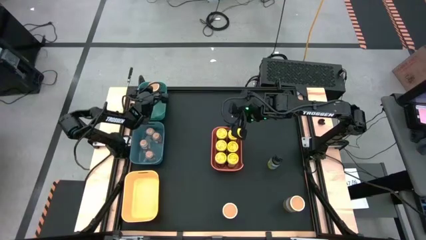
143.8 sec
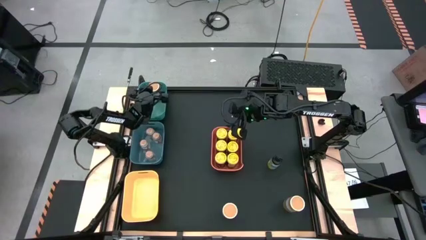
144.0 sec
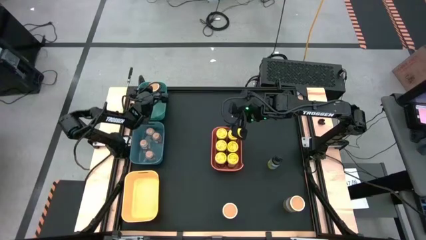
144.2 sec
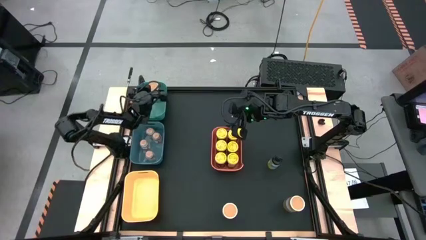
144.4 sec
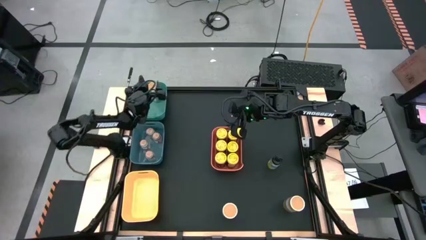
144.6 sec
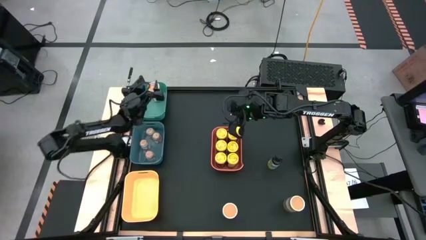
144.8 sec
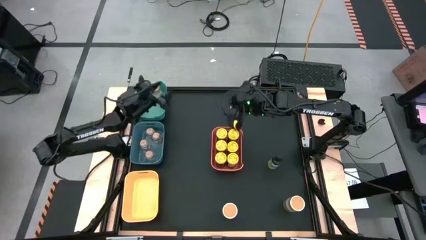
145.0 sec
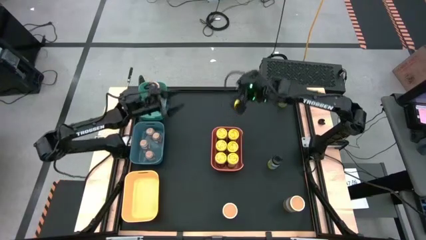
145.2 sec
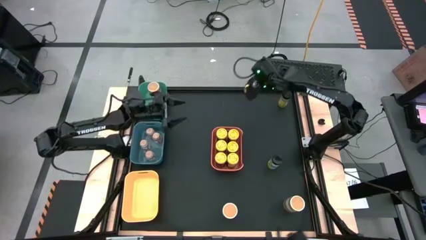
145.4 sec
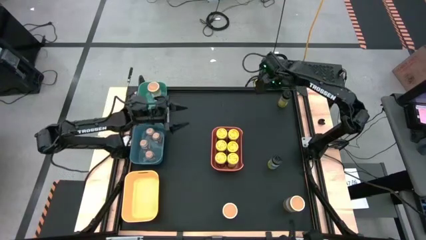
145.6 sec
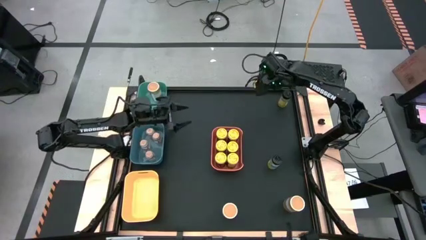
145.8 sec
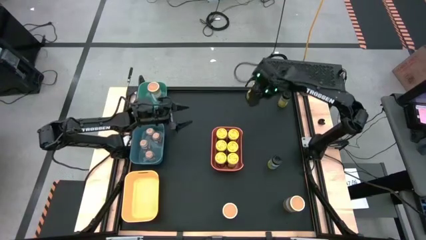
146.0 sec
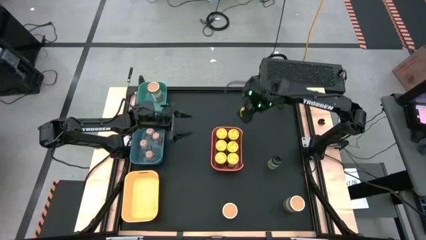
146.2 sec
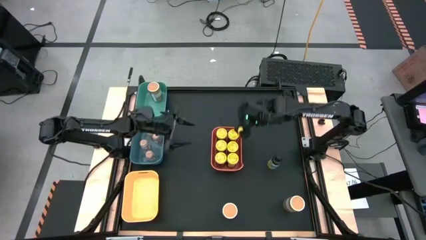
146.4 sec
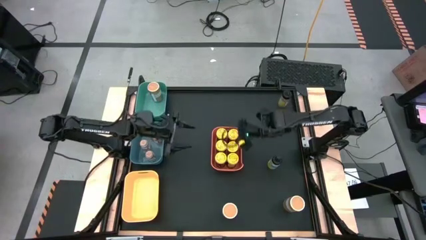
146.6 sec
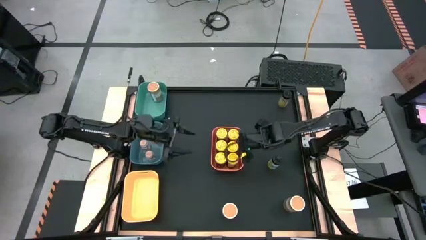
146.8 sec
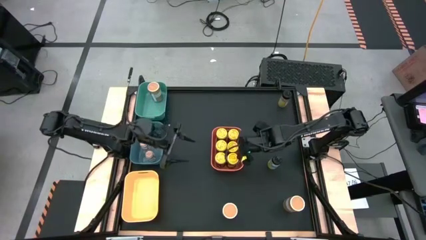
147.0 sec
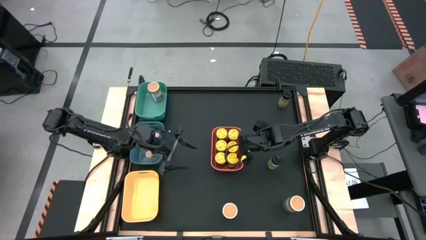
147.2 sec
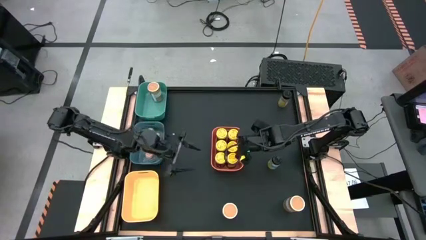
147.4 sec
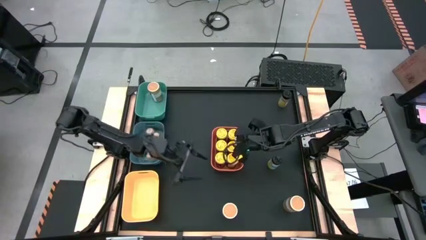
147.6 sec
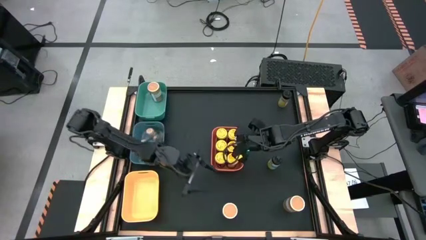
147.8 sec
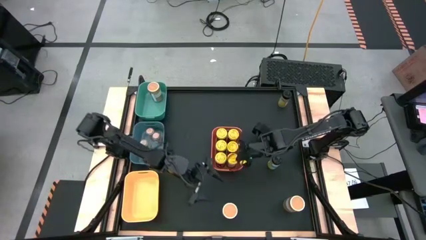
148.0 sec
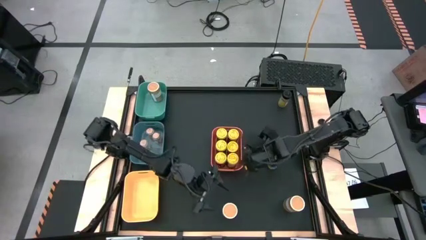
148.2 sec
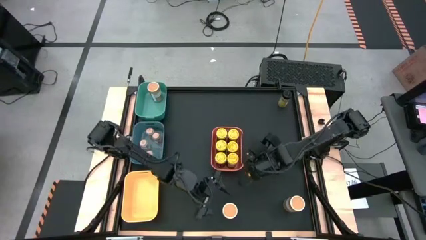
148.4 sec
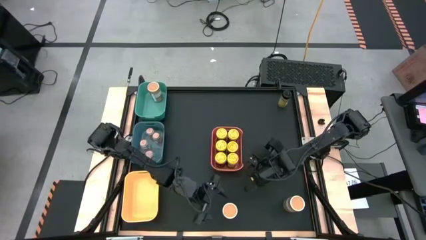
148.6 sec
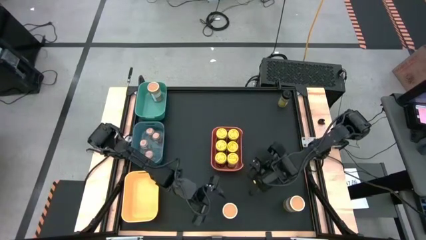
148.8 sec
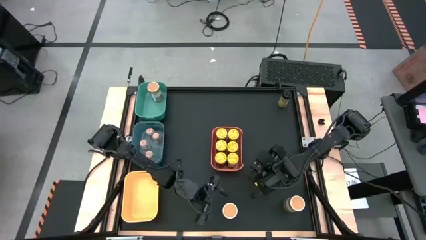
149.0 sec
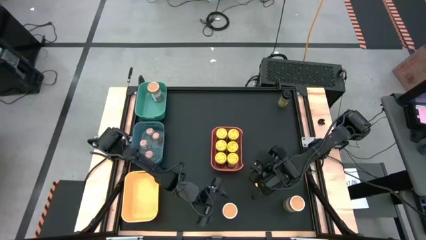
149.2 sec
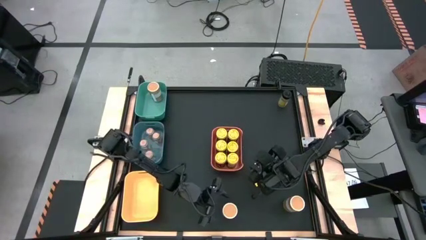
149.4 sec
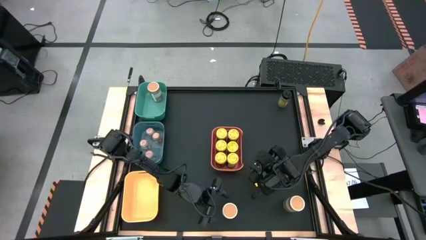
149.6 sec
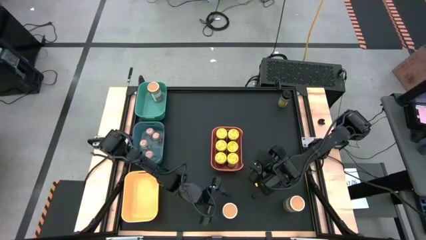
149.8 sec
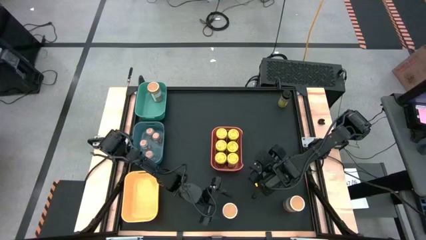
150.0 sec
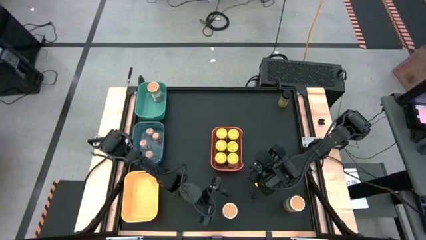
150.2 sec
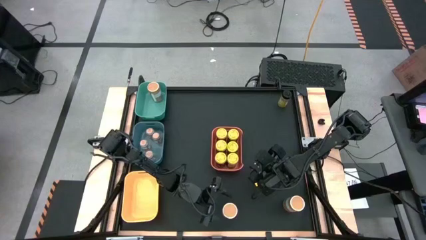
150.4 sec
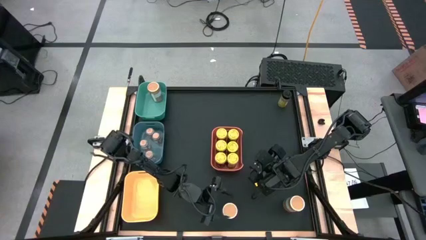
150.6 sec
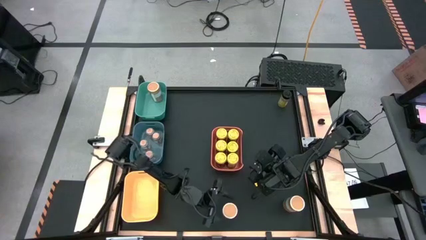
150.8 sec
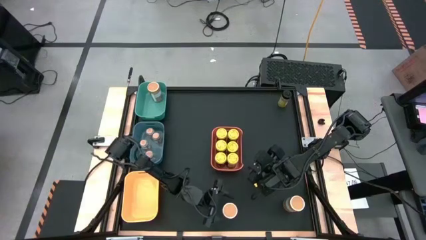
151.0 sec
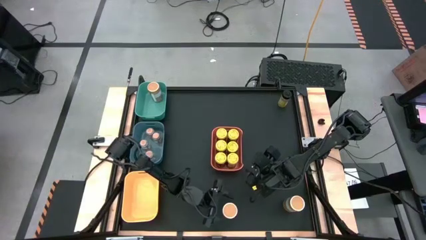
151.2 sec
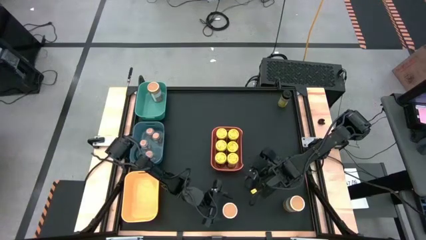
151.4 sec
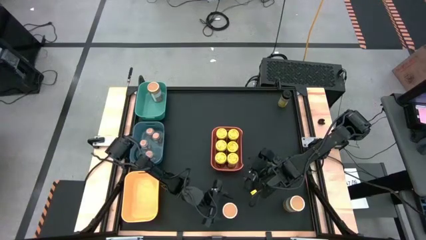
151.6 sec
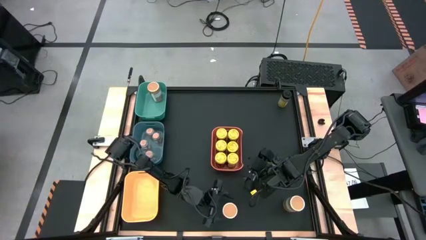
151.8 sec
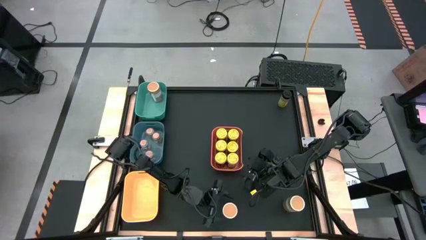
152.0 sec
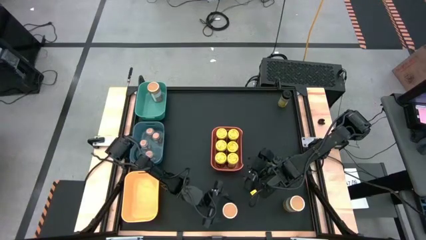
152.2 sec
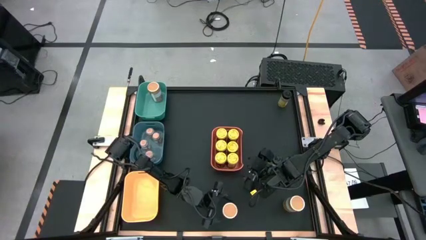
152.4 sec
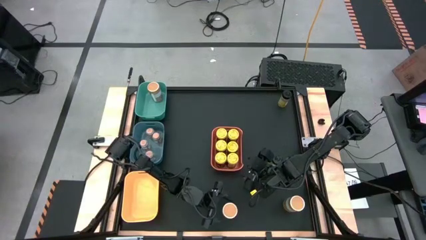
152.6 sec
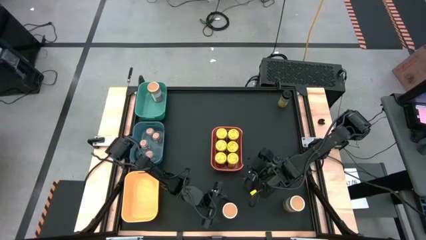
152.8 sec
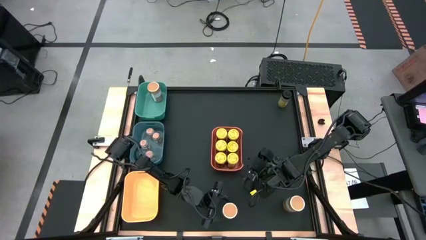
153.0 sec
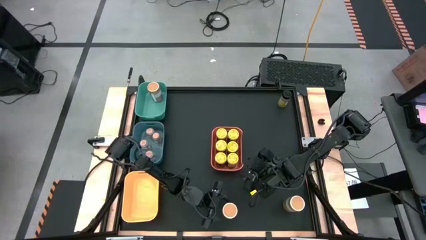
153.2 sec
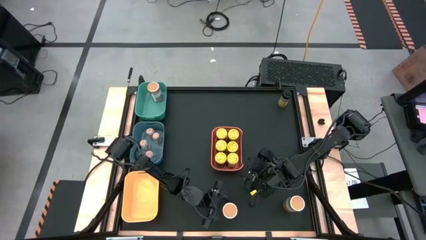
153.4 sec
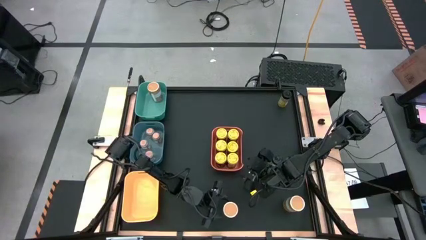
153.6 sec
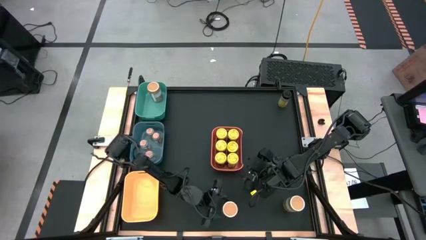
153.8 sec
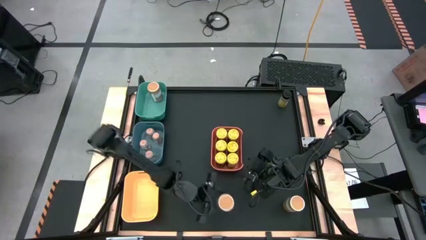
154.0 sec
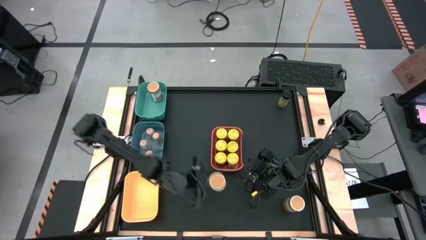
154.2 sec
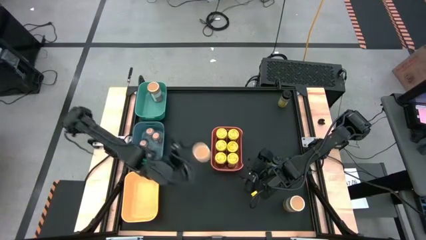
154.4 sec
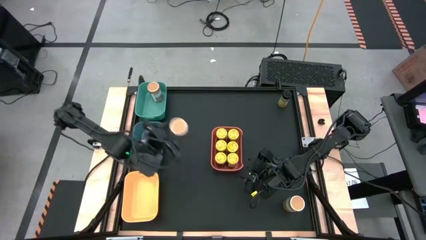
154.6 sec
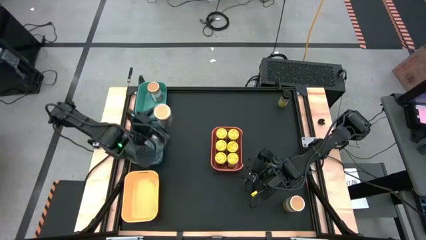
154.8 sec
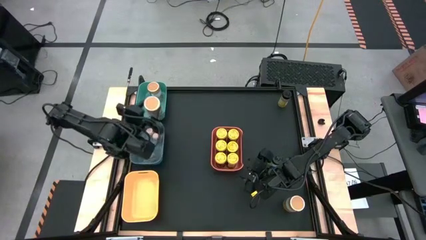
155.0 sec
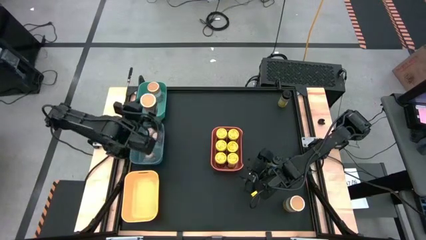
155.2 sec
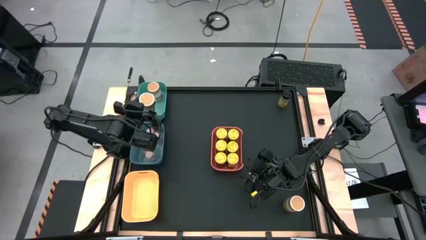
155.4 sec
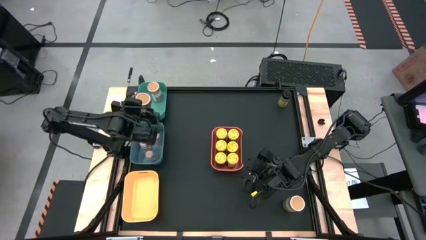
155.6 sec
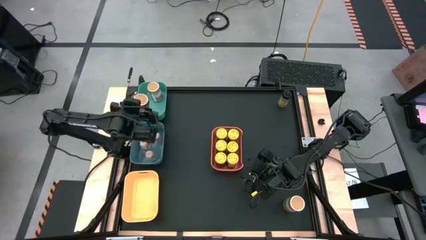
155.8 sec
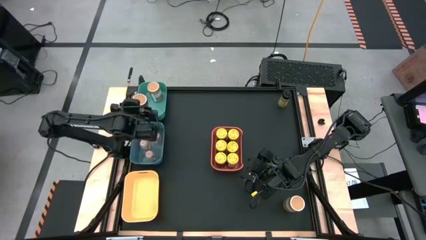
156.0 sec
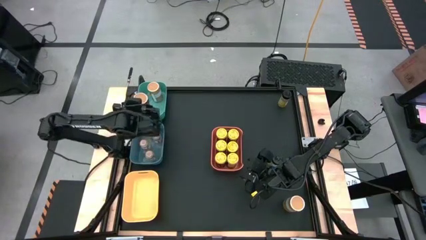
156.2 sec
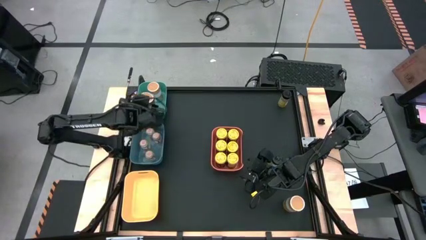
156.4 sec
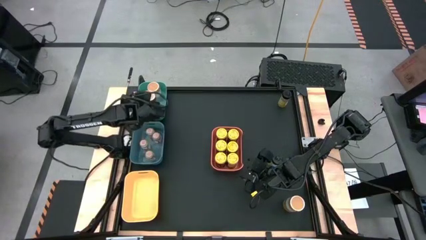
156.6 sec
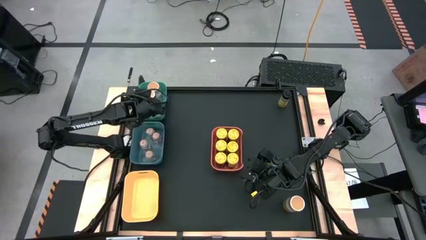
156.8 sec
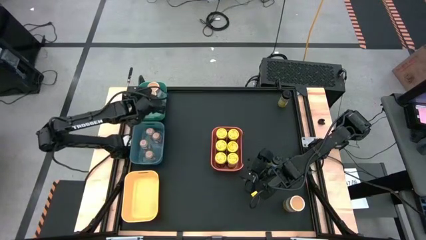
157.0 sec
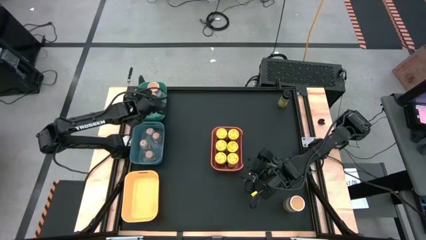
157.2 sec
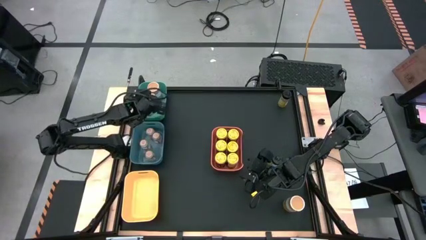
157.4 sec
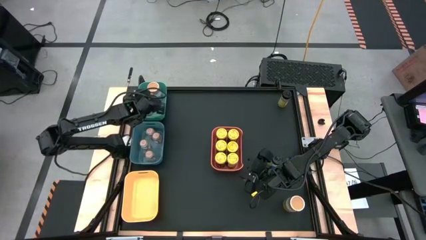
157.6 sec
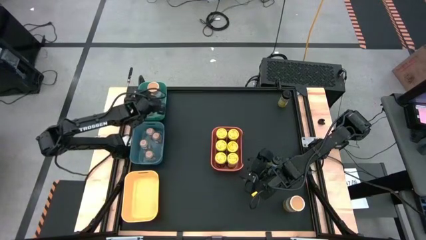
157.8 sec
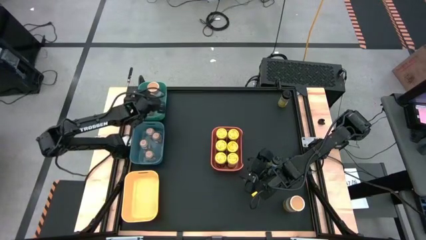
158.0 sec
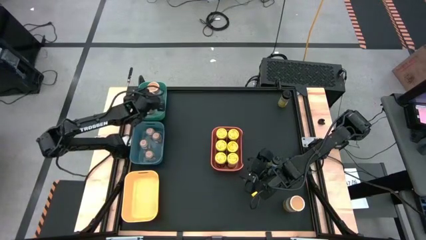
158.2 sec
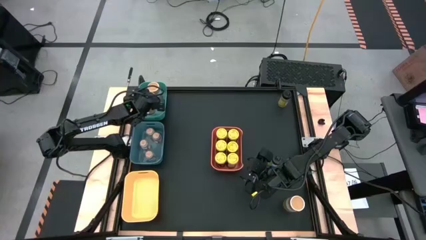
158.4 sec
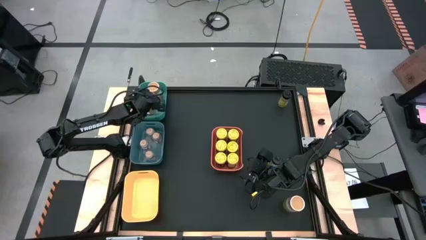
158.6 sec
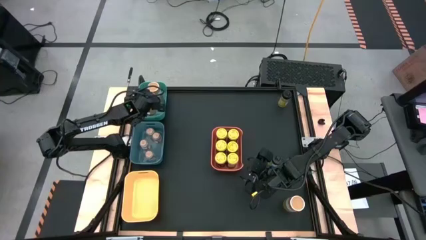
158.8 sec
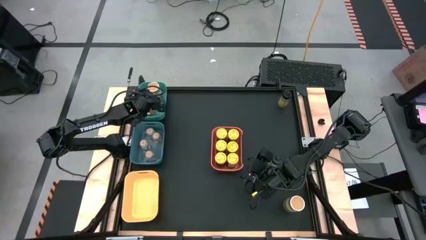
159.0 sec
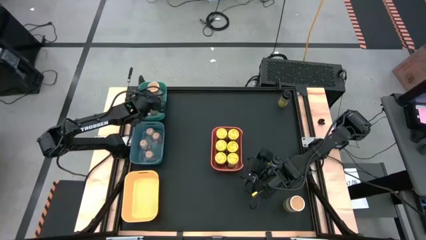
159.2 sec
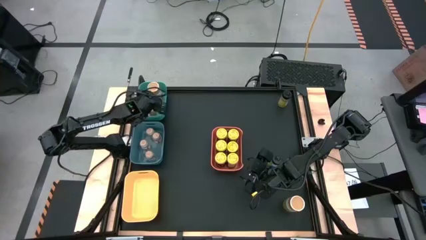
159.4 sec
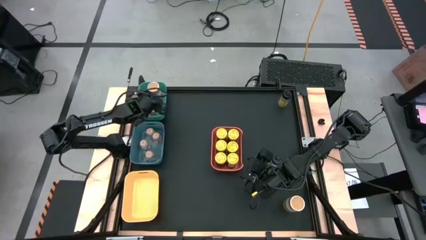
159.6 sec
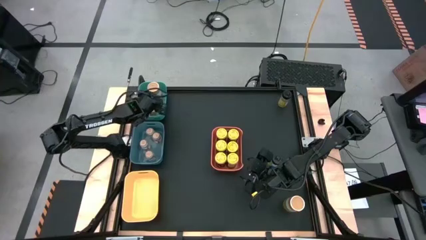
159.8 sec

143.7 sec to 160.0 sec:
Task: Sort spices by type
Put the golden seasoning bottle in the green bin
